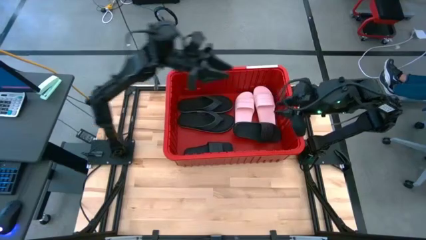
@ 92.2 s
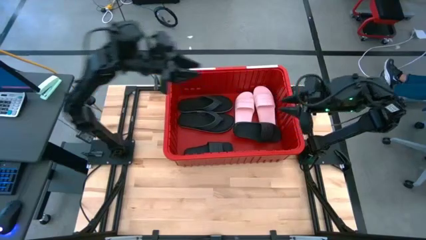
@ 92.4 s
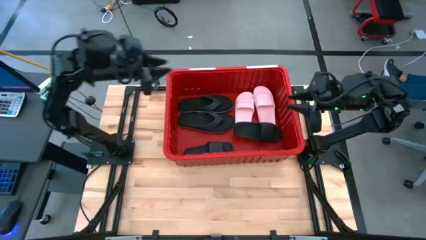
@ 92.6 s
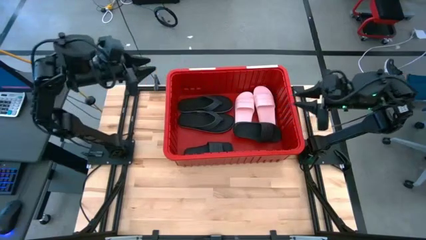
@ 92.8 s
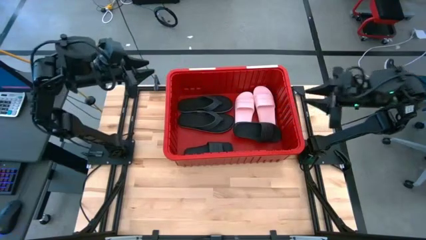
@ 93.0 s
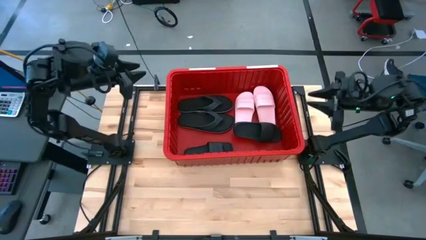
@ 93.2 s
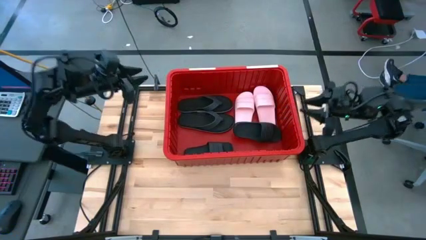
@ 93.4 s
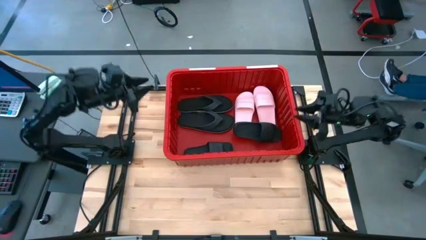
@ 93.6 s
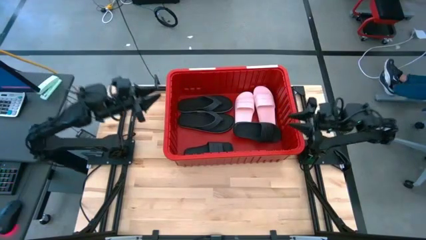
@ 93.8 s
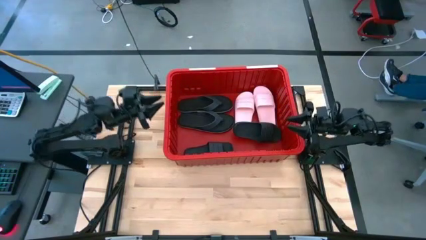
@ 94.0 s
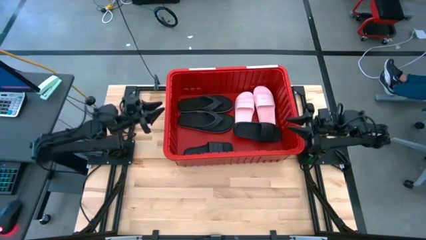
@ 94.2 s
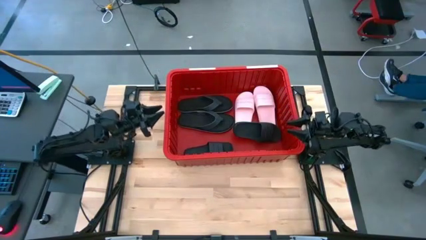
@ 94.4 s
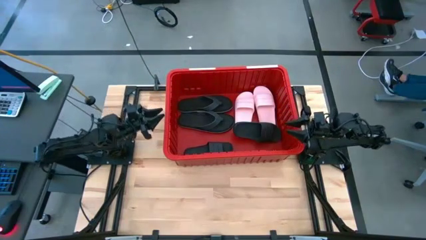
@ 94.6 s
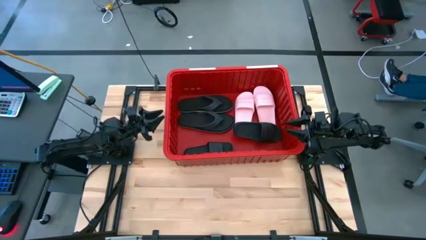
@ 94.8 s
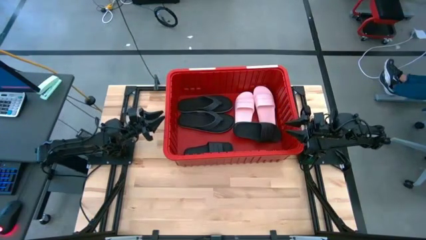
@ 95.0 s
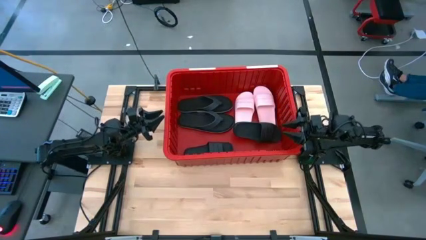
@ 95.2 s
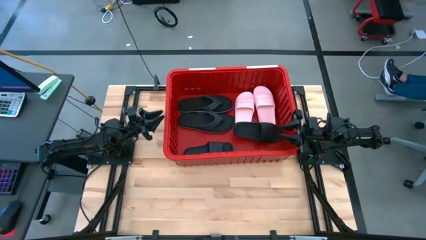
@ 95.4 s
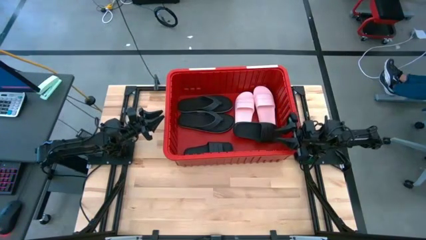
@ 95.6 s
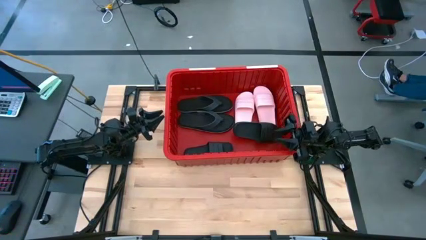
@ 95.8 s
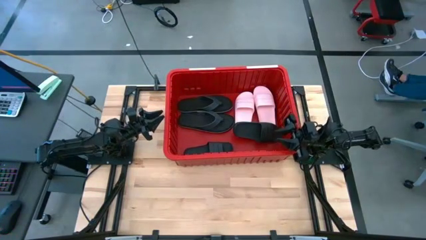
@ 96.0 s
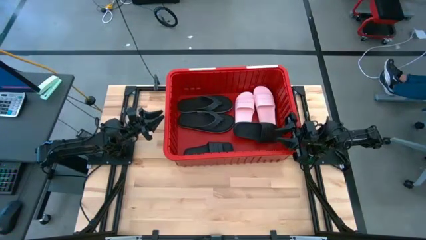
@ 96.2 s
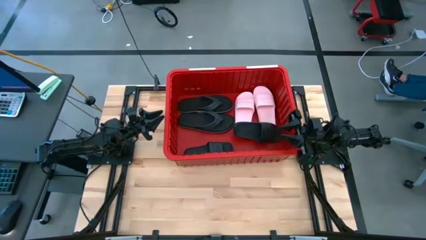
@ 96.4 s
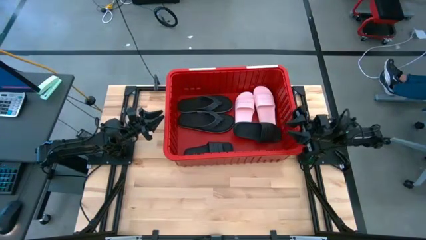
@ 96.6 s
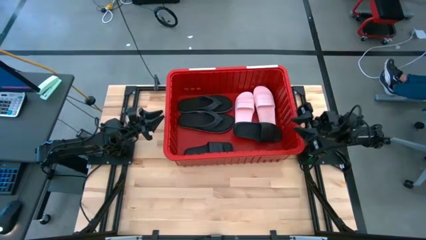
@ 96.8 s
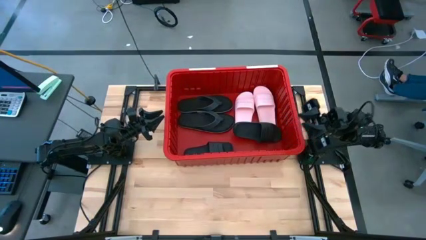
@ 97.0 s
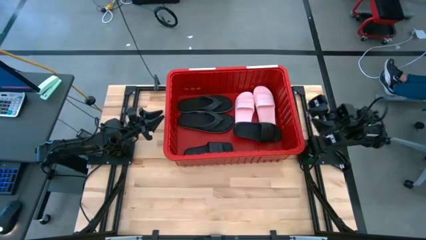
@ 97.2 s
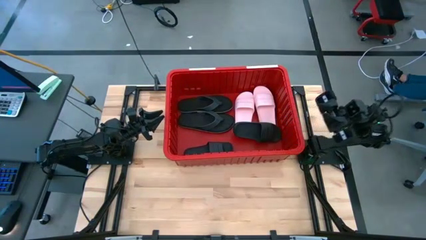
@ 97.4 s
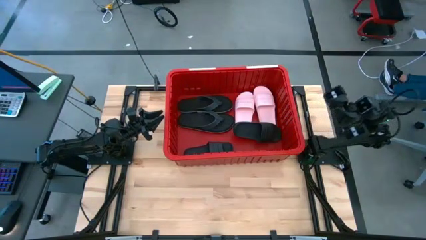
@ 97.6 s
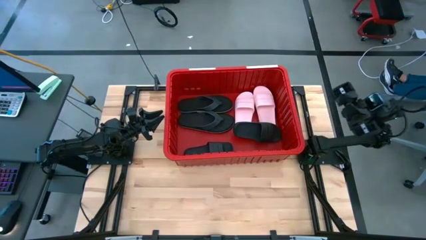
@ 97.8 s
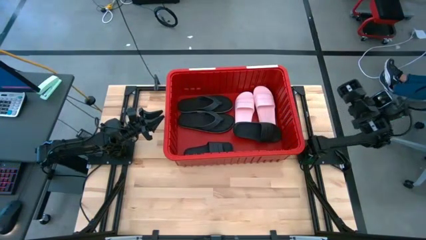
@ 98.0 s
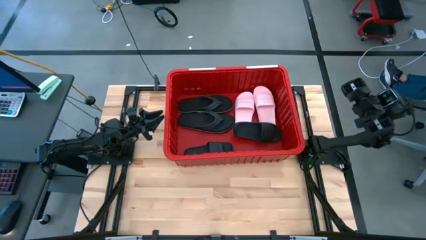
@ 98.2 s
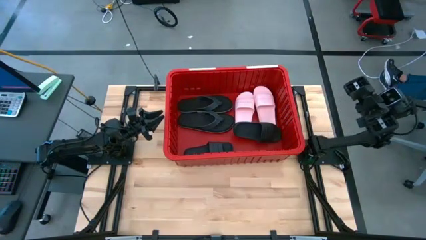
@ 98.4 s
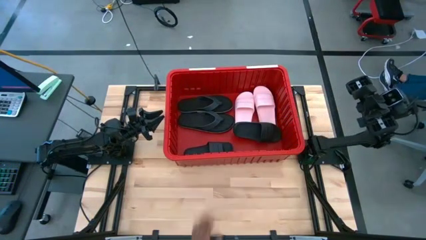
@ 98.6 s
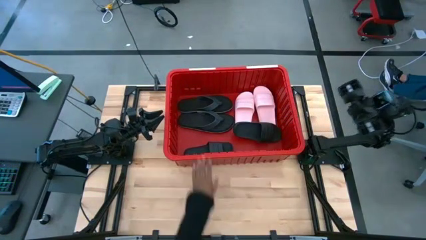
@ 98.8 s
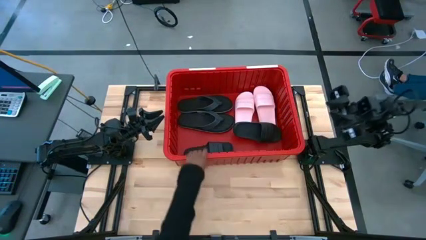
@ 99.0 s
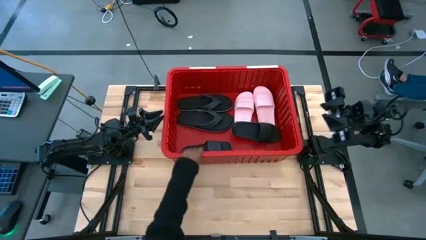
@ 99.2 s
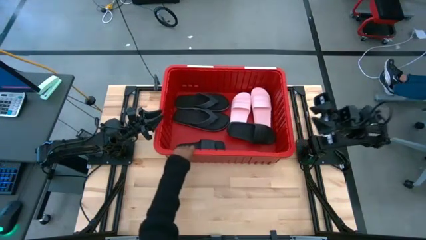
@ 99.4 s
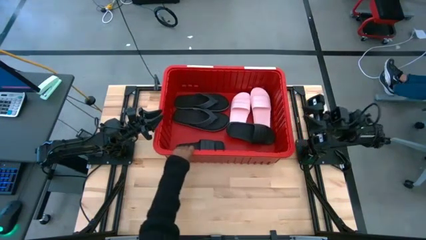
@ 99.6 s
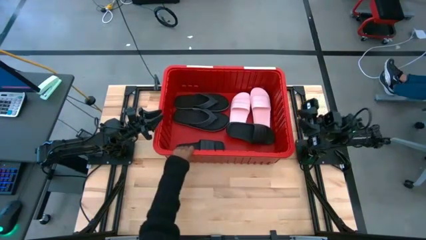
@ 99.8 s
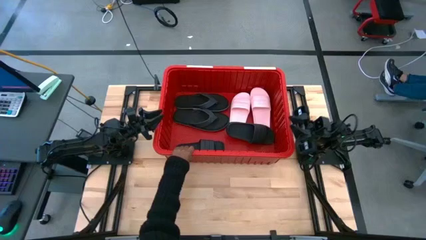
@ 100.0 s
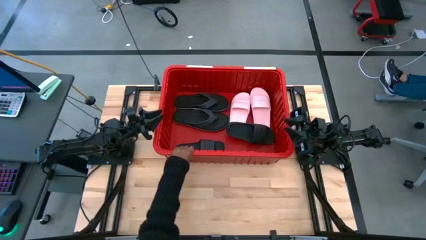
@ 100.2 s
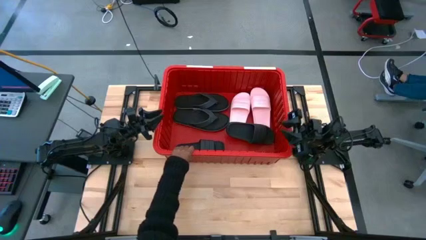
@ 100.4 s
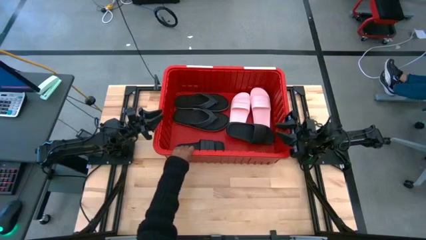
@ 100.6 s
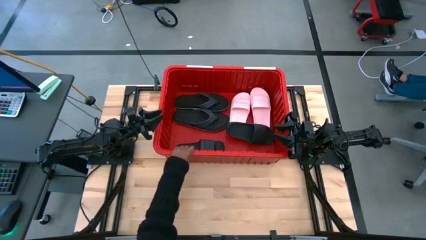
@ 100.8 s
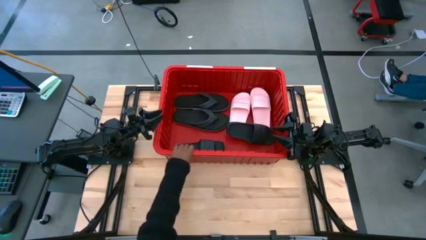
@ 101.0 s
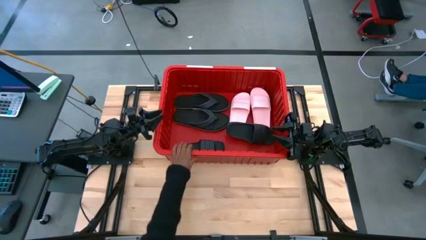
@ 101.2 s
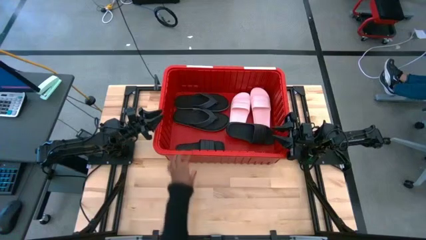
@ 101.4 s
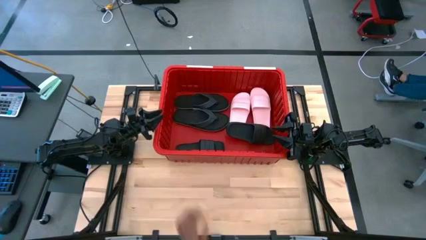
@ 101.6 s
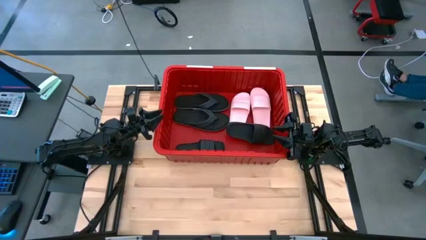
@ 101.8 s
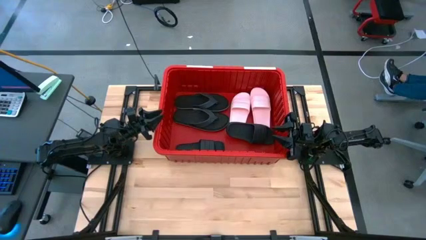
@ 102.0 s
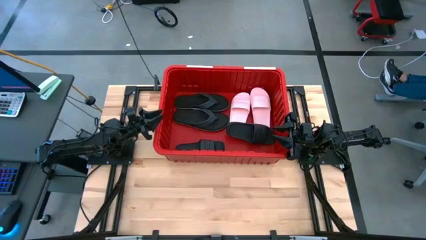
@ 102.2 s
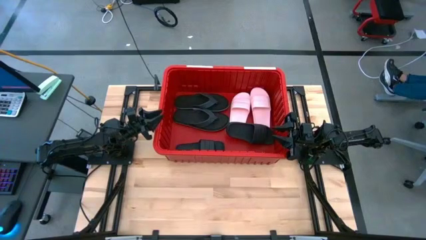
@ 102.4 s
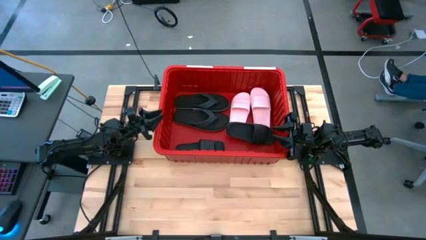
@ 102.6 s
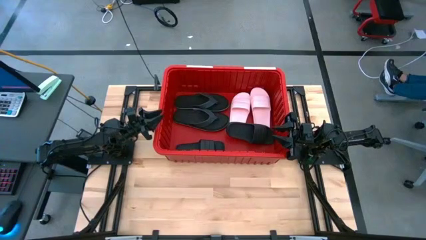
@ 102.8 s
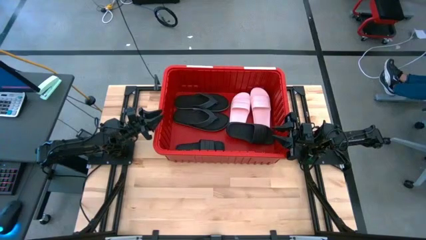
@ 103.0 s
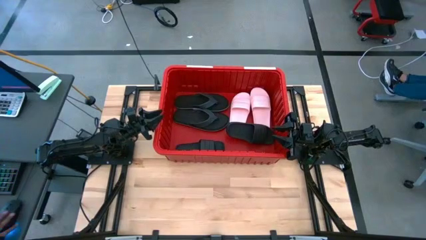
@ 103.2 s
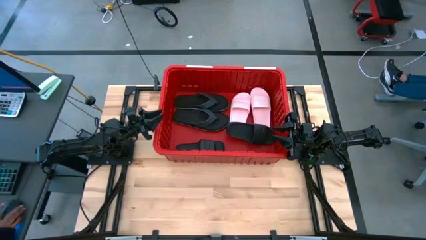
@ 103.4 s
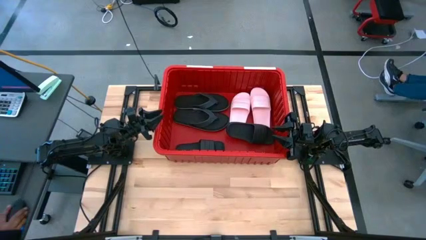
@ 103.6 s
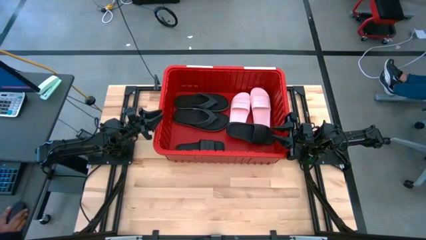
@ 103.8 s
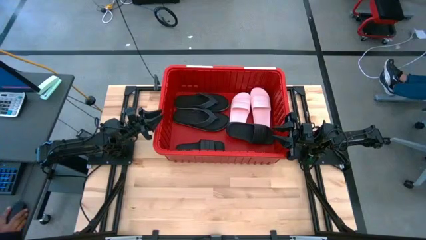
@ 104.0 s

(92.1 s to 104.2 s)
Task: Pick and place slides into bin
Return to Home Position

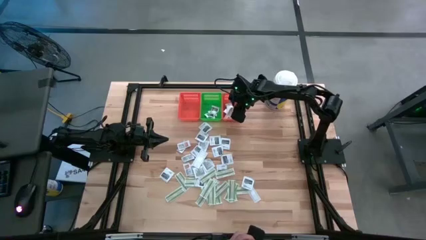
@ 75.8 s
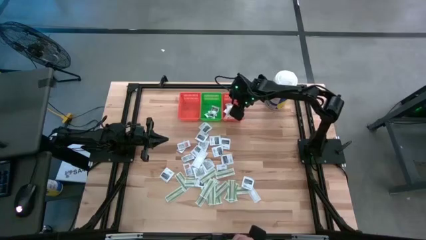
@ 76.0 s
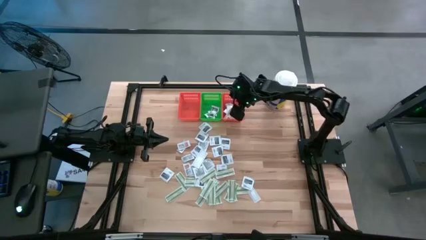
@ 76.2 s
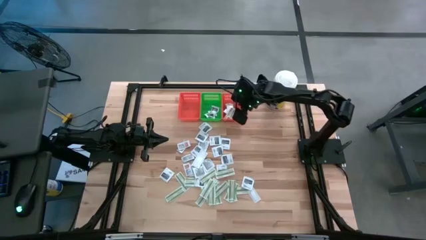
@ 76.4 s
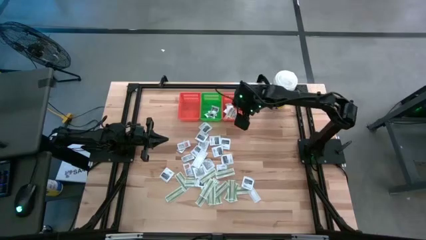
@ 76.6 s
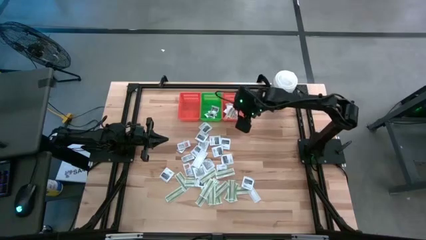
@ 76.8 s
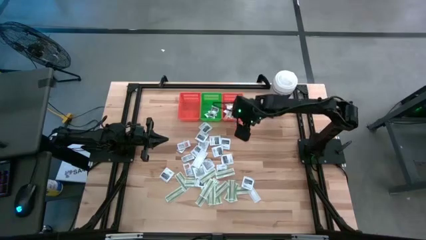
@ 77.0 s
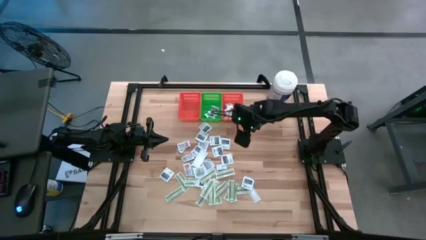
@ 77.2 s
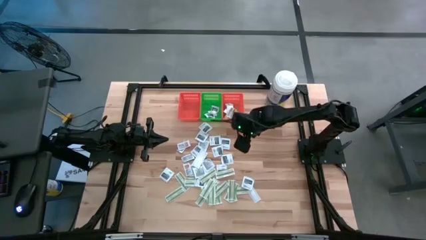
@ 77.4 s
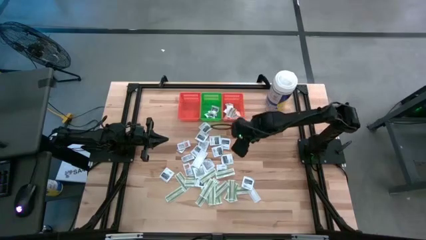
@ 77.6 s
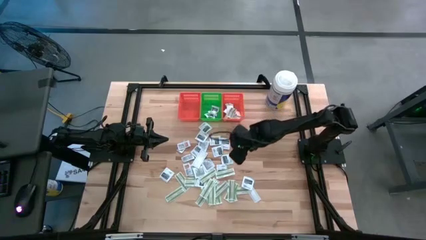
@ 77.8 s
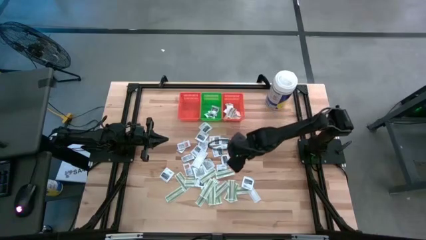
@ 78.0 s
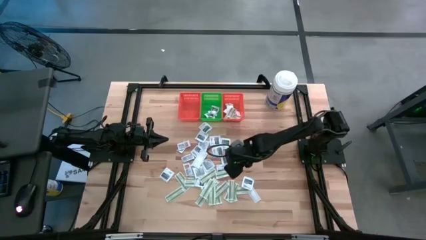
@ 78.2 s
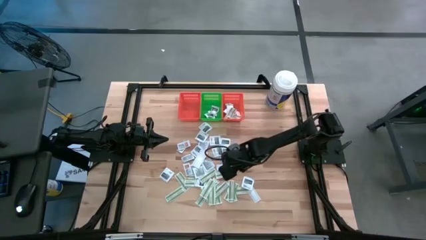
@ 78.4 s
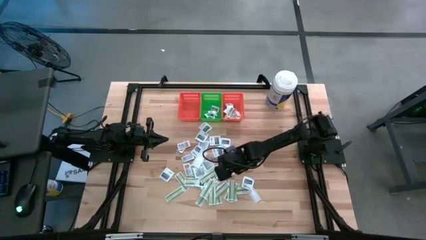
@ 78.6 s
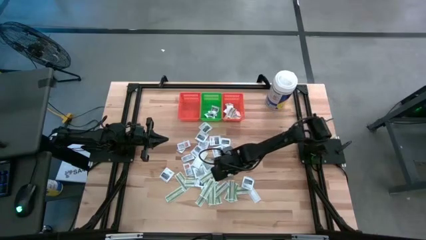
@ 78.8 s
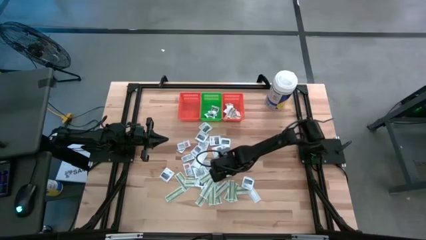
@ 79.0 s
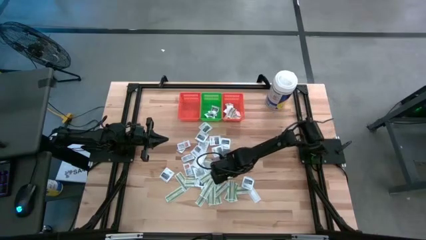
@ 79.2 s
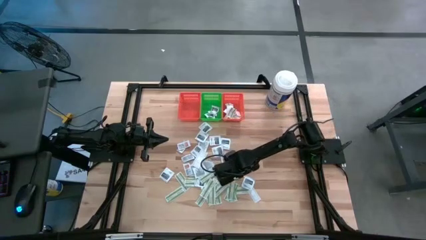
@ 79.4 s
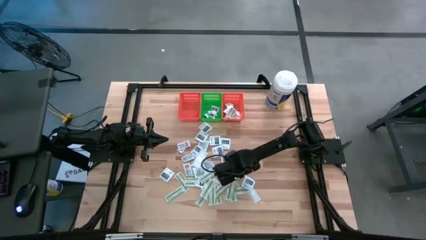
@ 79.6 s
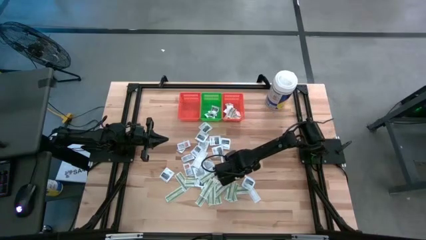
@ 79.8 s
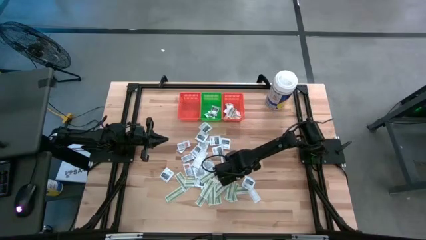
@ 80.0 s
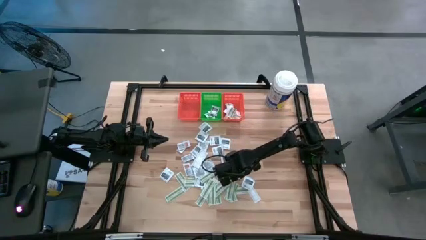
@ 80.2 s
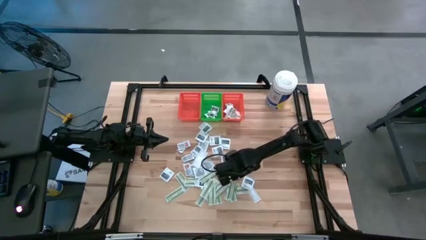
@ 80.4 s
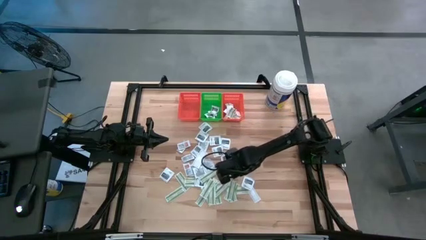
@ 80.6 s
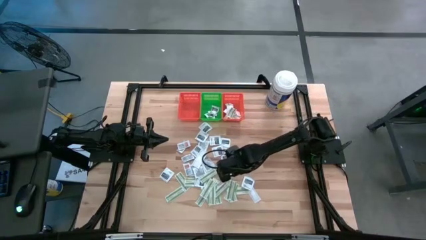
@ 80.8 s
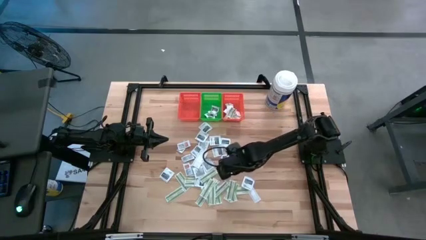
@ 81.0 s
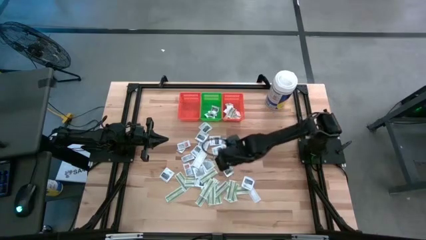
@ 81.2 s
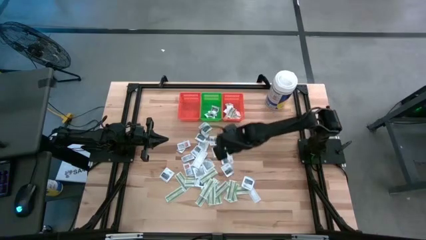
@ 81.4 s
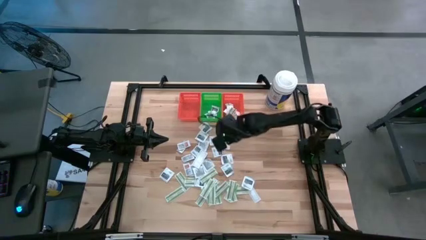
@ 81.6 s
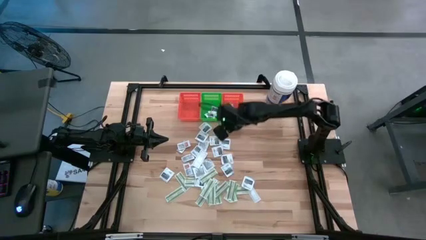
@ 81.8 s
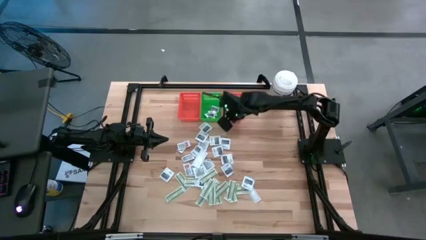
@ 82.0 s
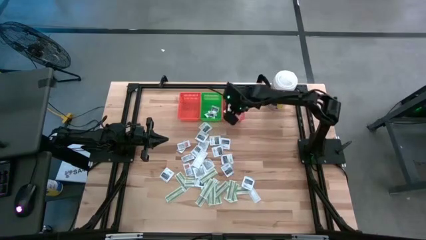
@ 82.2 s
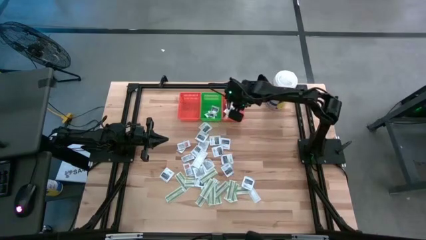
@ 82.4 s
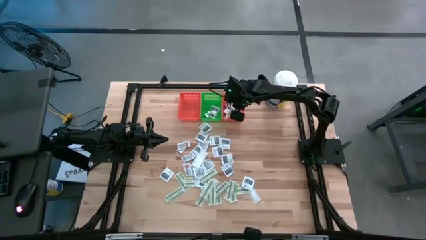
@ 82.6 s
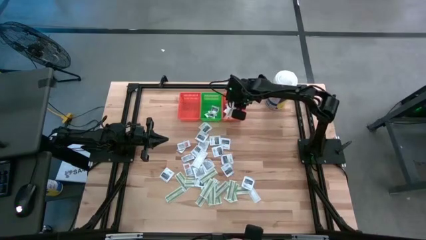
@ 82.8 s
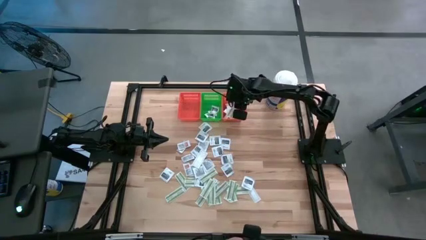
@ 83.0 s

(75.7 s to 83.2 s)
Task: Pick & Place First Aid Supplies
Put the bandage pack into the right orange bin
